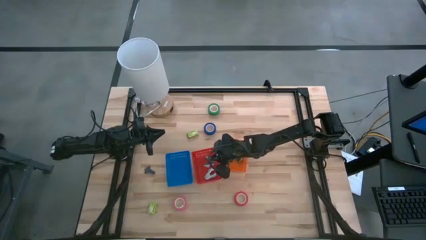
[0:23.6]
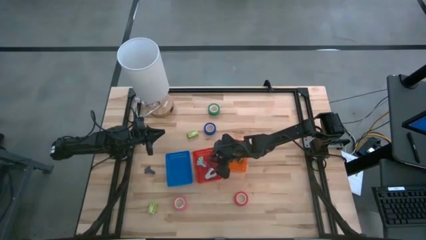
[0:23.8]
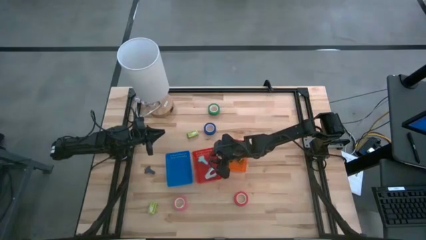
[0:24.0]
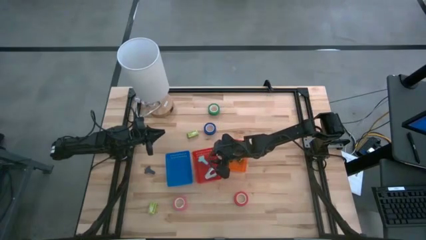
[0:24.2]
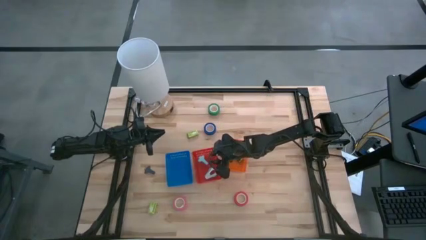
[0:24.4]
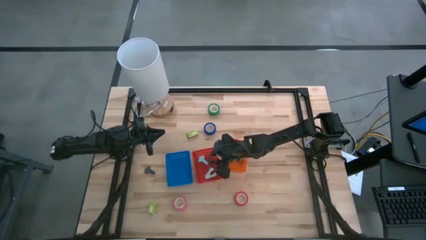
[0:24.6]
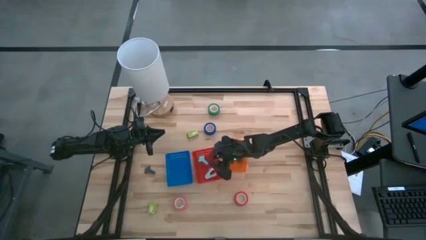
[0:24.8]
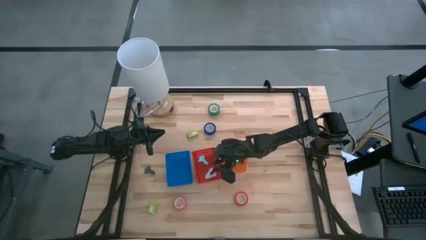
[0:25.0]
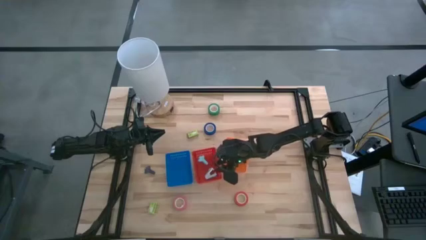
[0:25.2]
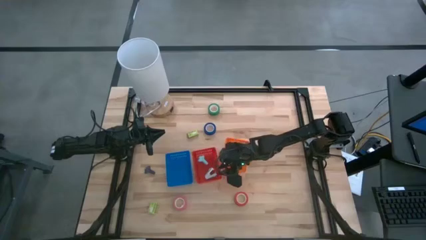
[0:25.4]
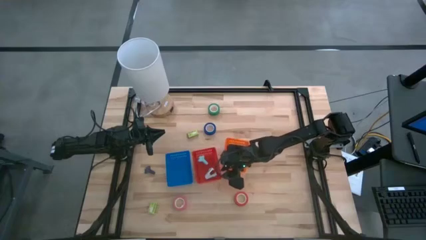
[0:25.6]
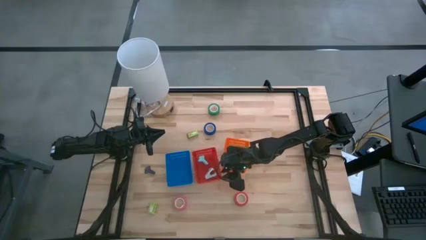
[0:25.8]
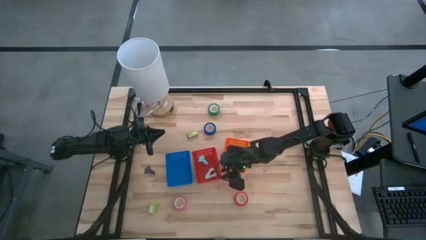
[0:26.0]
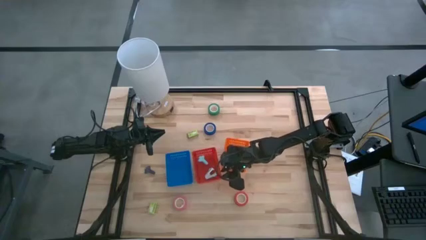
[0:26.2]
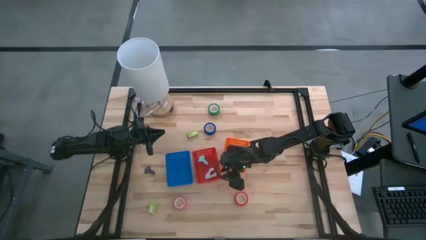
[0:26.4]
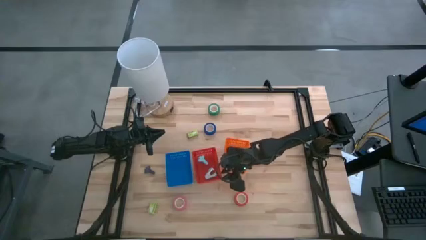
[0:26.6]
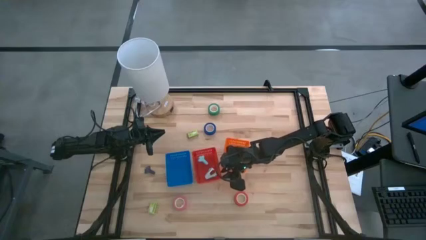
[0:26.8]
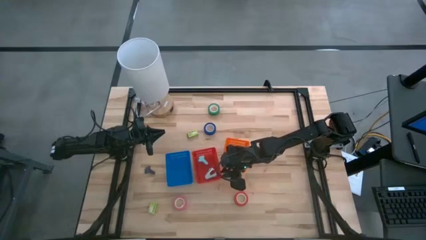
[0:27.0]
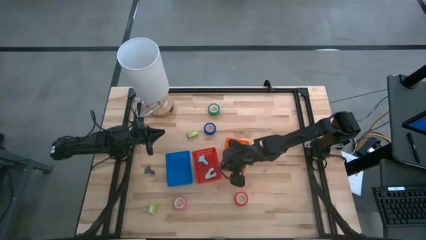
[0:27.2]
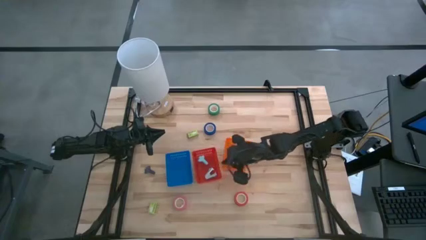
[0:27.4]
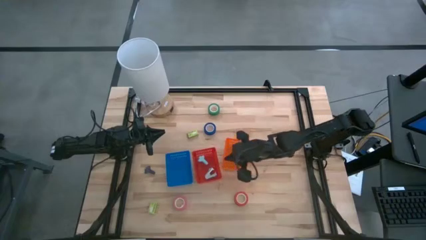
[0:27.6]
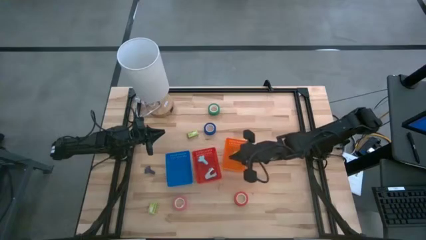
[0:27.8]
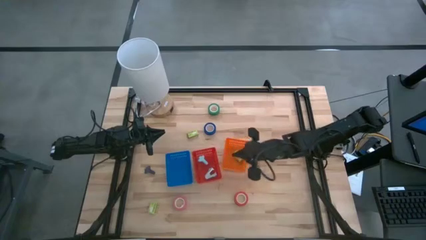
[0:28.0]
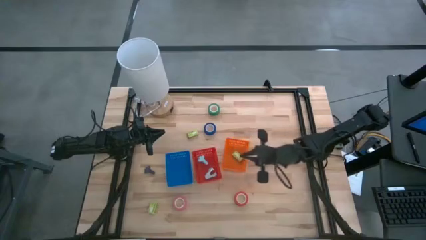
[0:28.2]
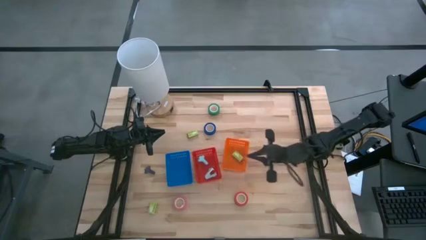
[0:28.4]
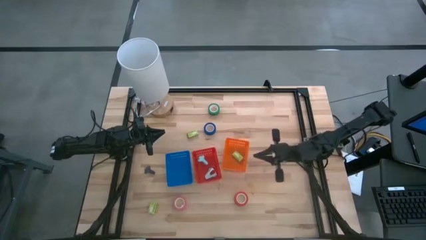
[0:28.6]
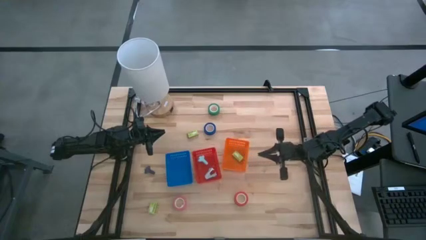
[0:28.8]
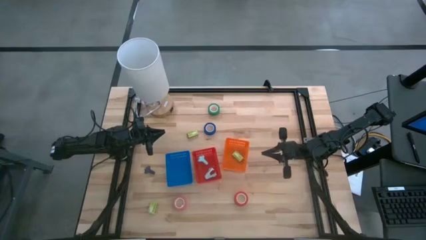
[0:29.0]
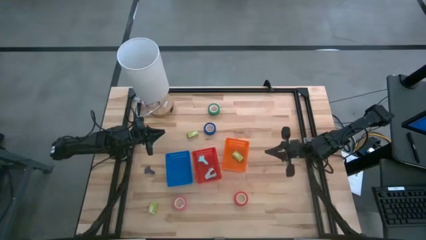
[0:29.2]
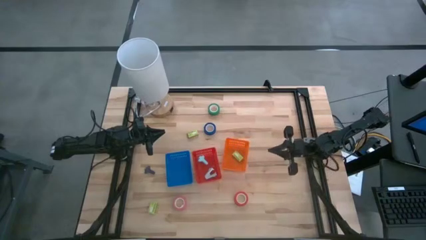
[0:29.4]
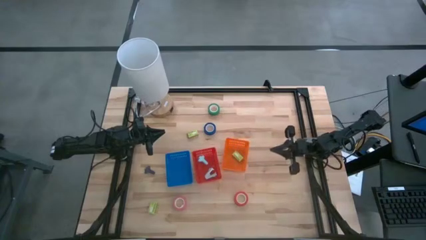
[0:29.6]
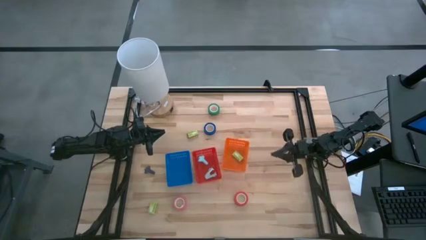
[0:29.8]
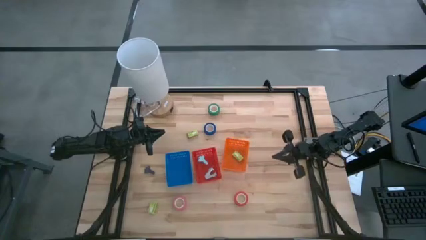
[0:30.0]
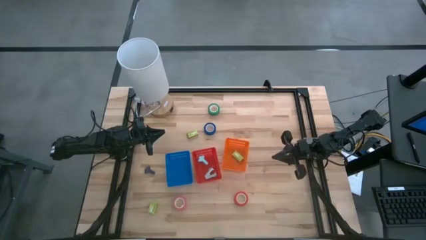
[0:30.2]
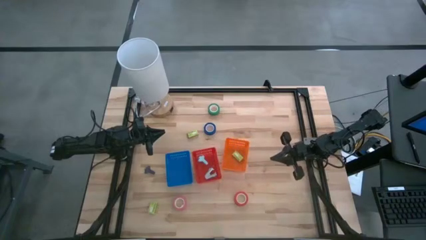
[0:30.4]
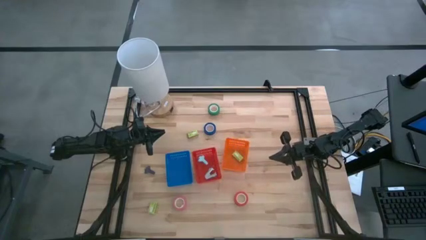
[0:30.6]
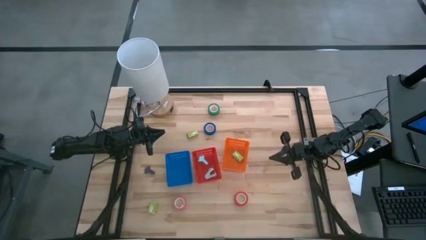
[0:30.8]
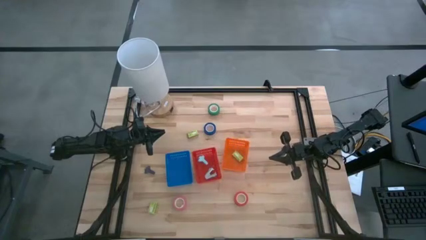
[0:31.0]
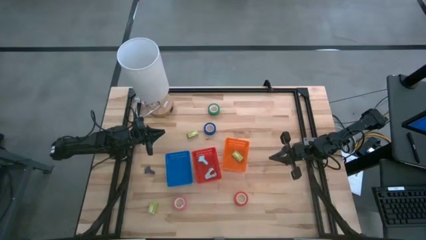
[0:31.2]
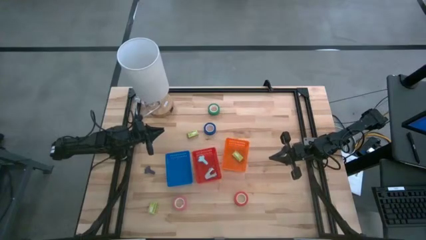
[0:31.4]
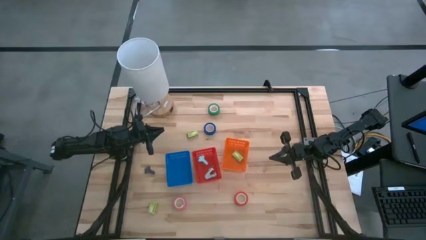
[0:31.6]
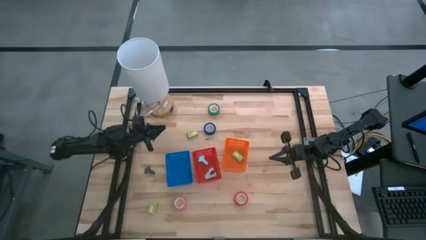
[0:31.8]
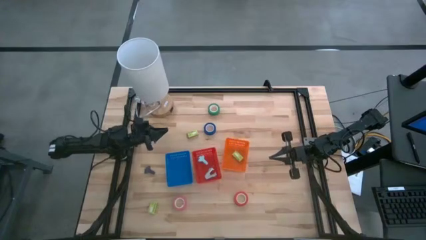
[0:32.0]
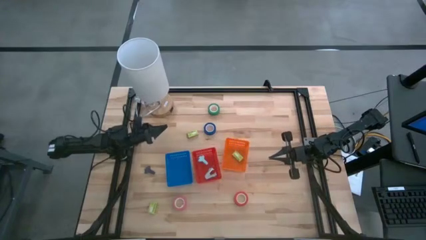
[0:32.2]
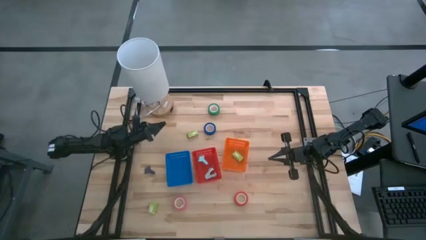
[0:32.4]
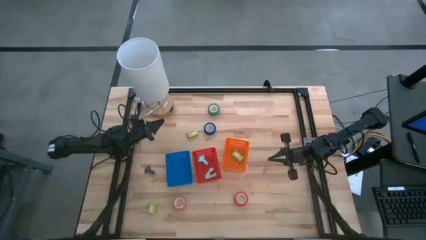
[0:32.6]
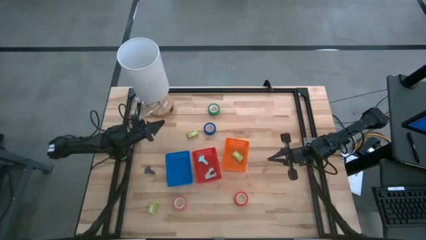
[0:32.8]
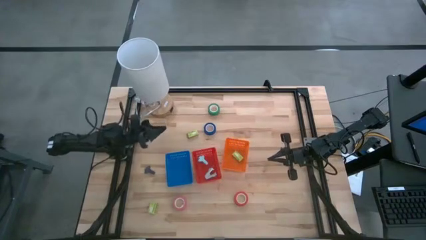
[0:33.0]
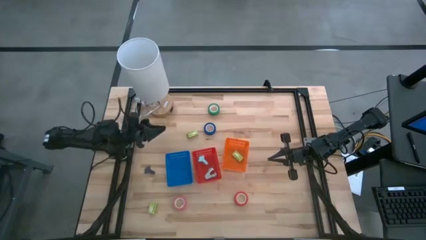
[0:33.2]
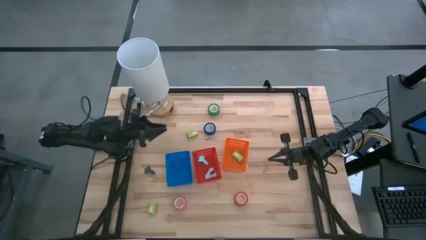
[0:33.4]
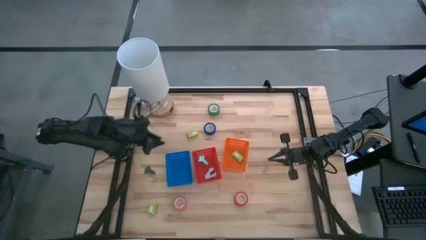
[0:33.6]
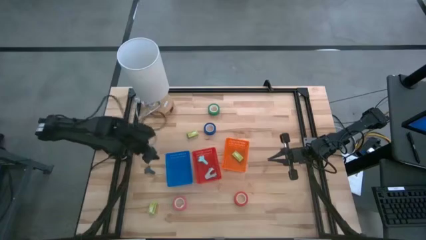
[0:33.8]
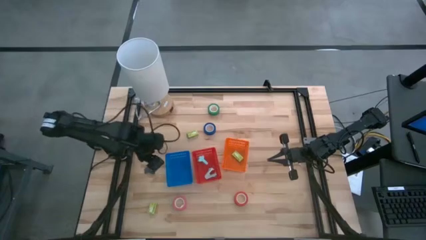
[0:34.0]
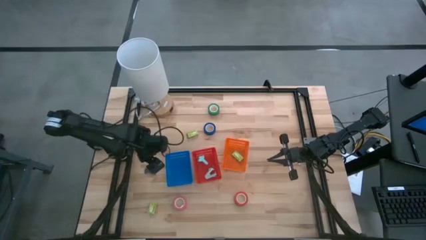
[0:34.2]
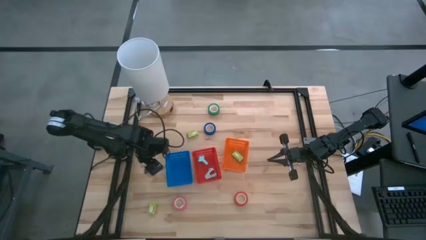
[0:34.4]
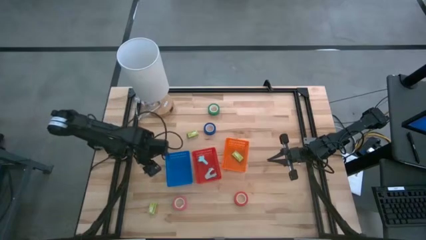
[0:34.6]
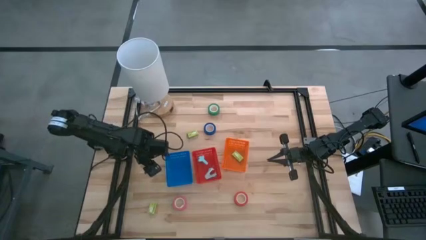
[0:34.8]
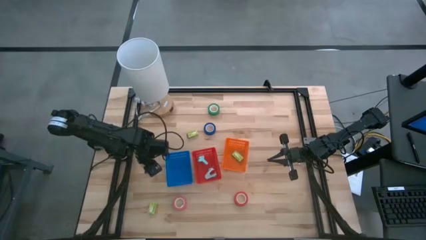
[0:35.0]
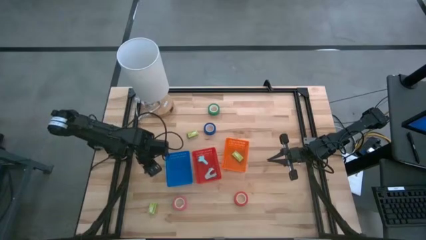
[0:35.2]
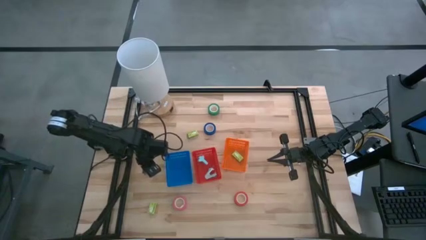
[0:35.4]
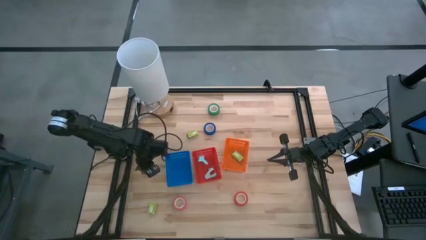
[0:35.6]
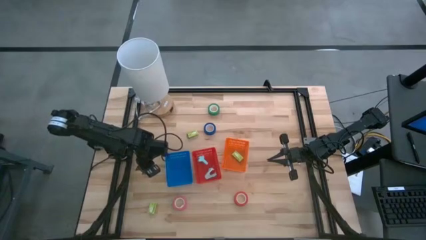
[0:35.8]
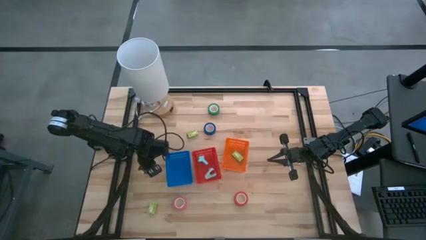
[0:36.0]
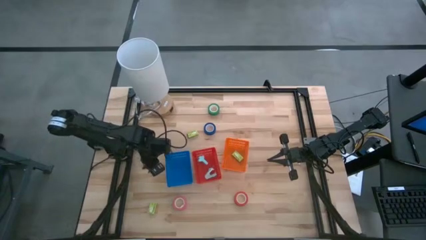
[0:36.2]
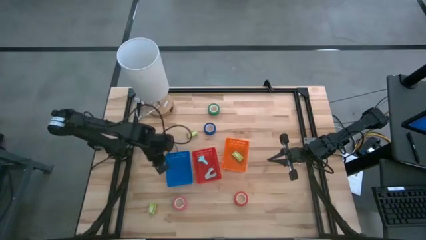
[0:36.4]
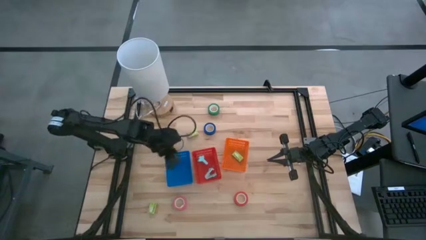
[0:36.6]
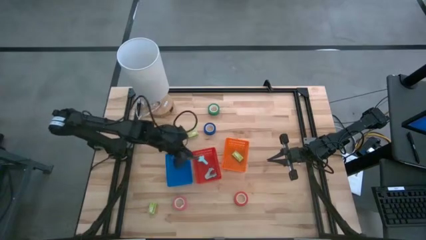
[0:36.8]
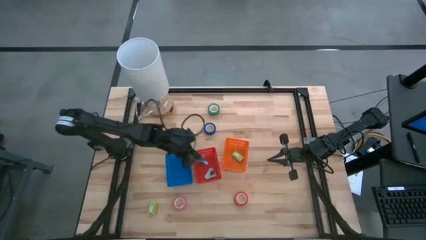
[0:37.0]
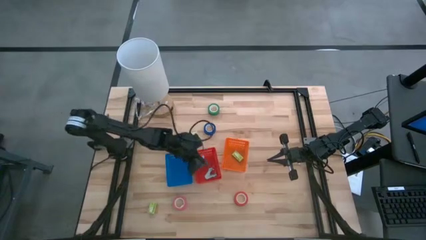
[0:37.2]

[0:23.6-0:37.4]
Task: Pick and place Stapler, Stapler remover, tape
Put the black staple remover into the red bin

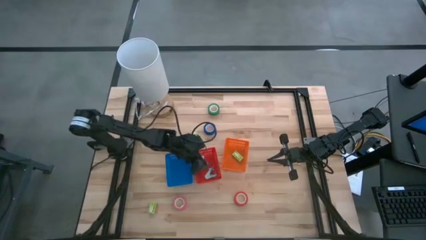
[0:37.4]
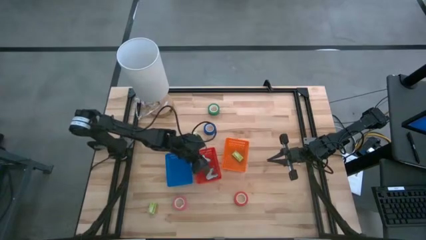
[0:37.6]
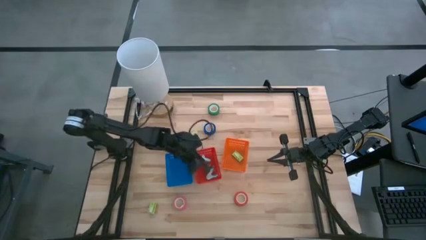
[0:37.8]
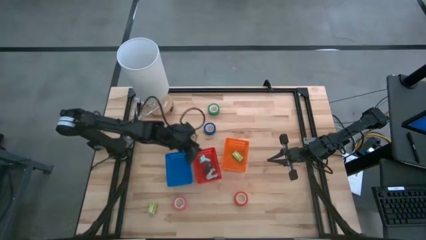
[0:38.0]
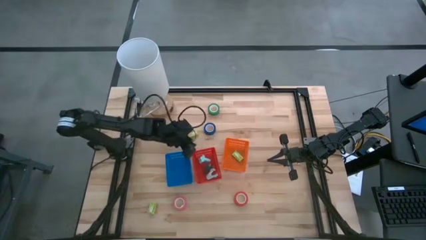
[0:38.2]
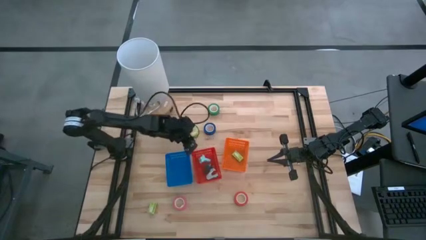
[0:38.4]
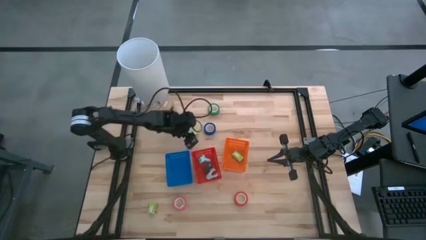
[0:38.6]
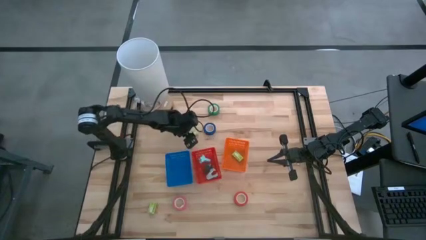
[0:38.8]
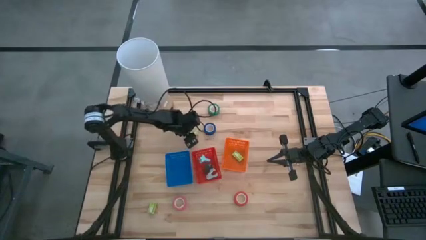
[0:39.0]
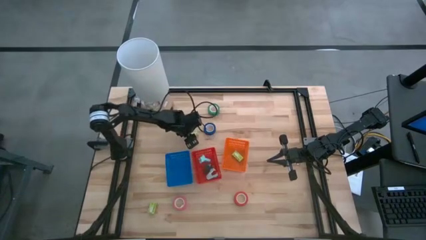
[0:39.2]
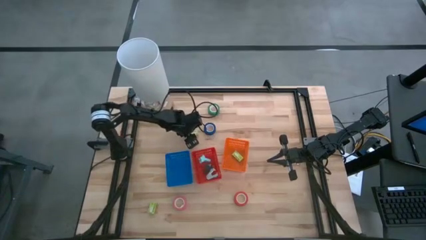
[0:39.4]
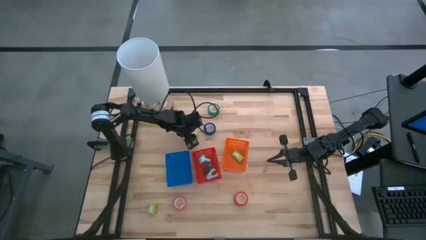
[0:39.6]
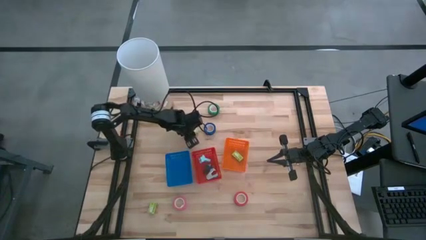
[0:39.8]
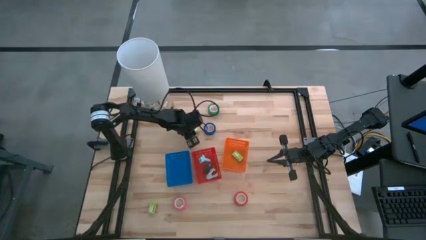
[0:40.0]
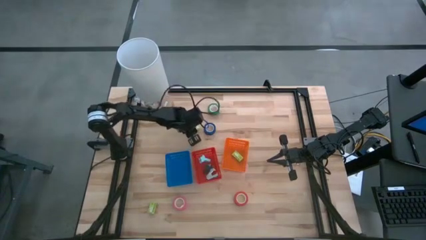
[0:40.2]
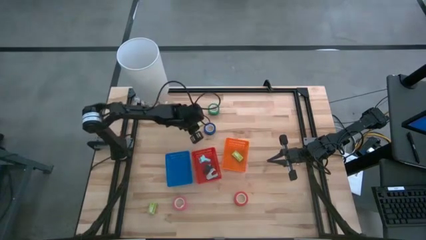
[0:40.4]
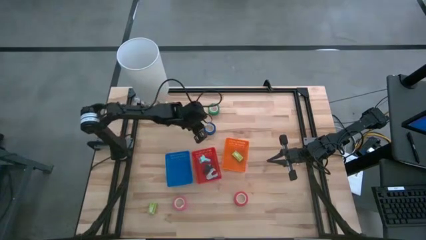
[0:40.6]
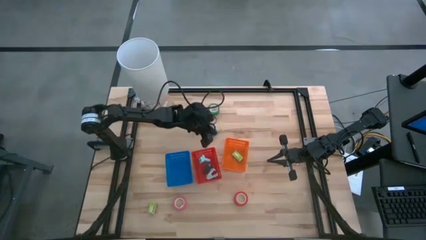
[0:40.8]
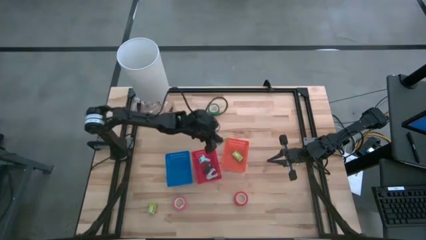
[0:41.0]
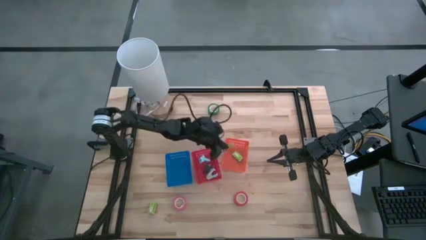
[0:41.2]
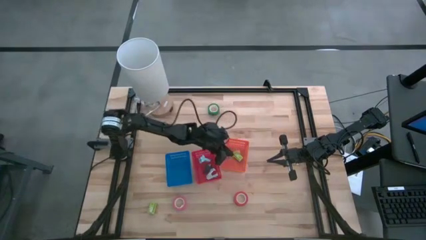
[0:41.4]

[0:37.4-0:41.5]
Put the top green staple box into the orange bin
